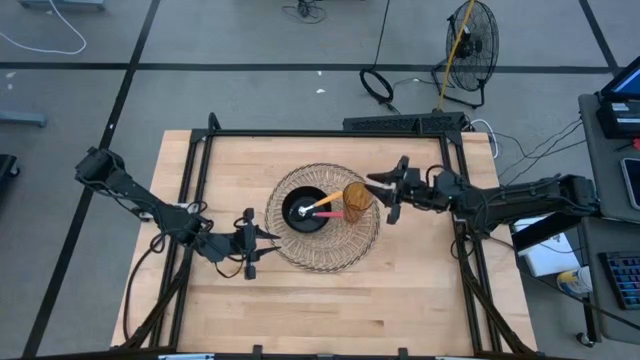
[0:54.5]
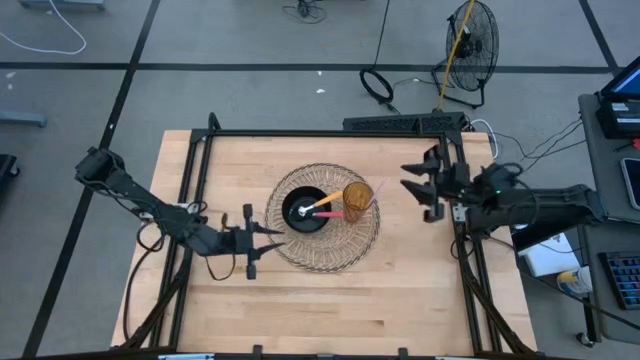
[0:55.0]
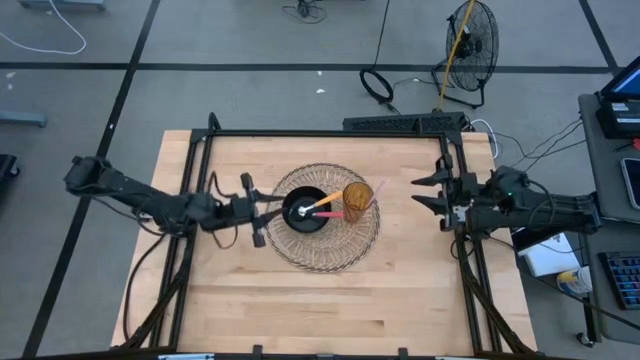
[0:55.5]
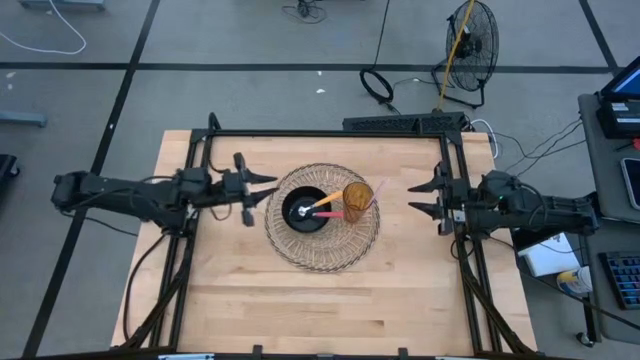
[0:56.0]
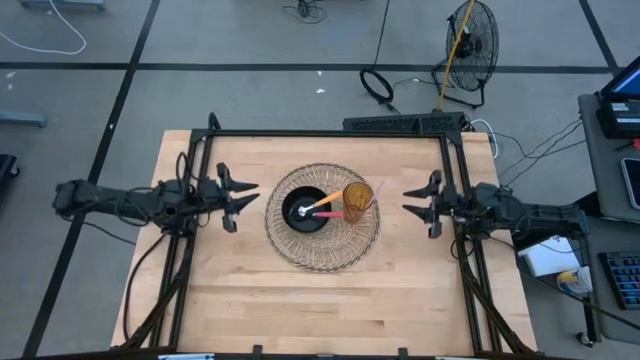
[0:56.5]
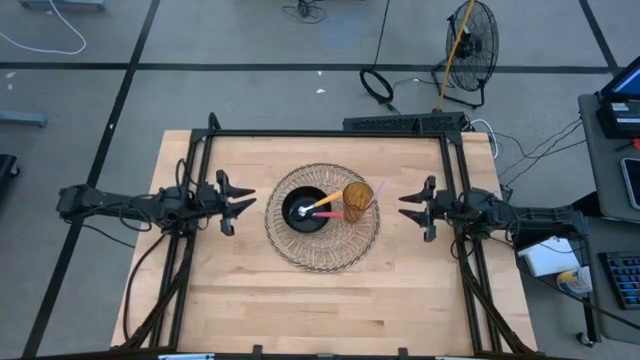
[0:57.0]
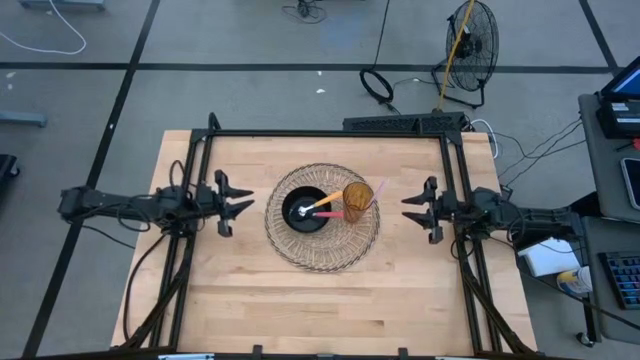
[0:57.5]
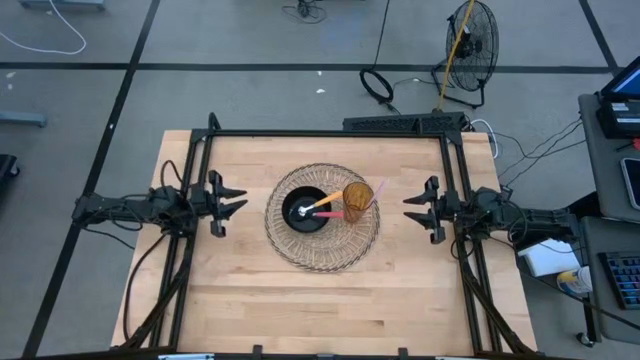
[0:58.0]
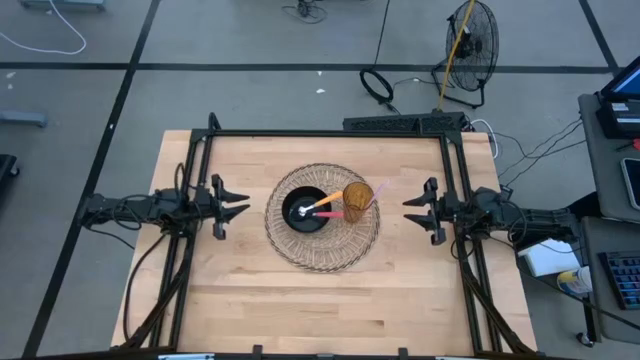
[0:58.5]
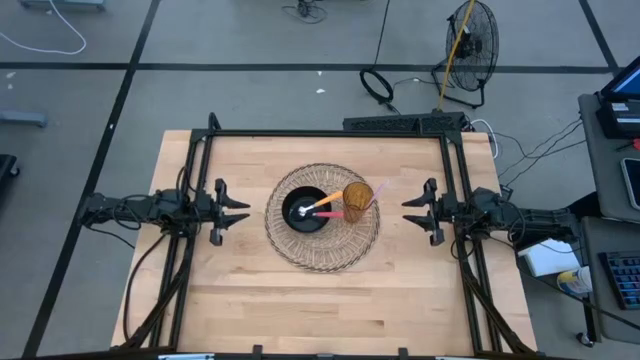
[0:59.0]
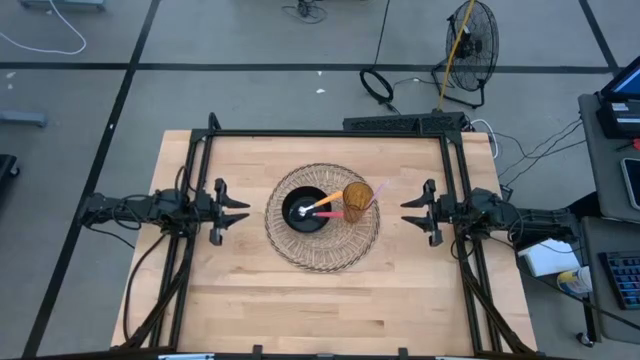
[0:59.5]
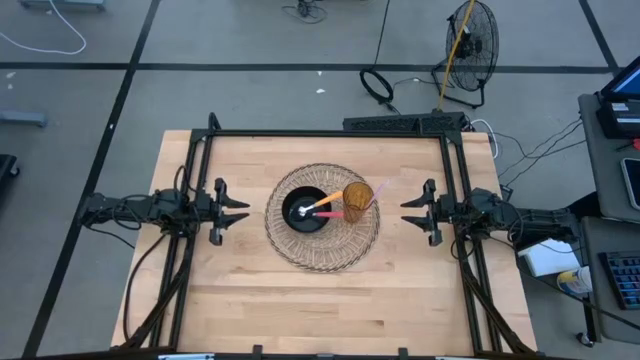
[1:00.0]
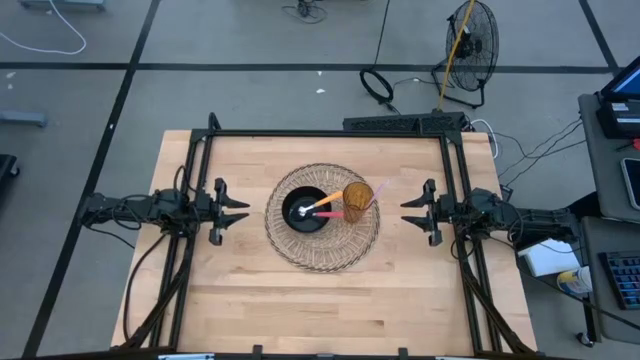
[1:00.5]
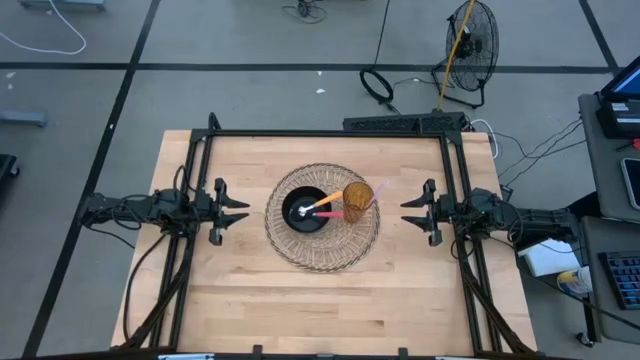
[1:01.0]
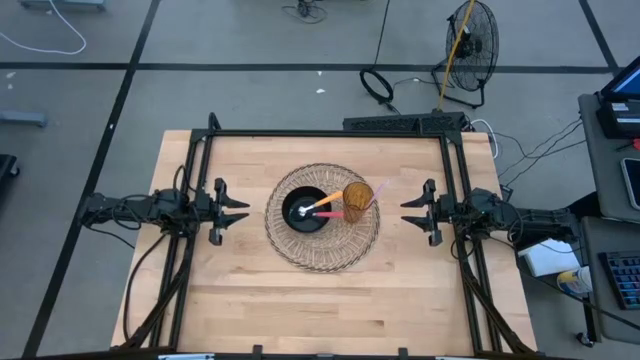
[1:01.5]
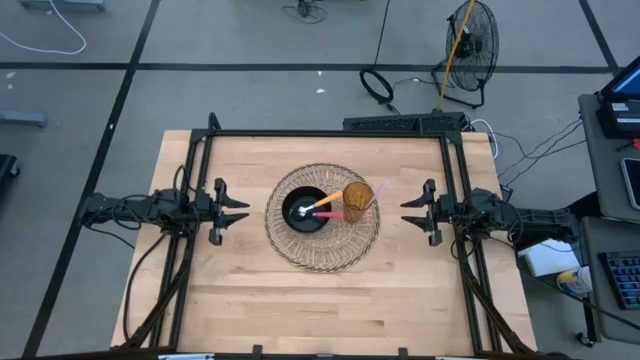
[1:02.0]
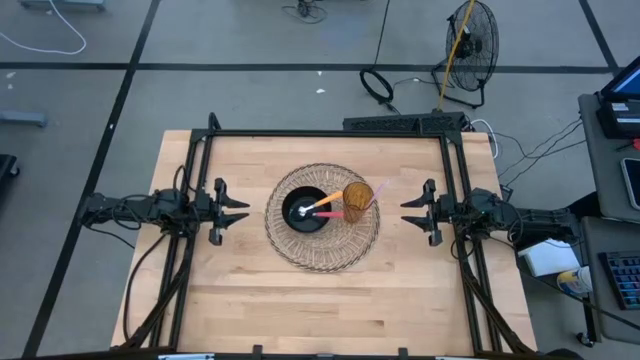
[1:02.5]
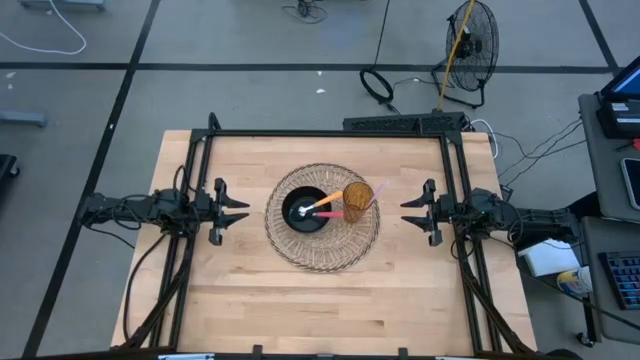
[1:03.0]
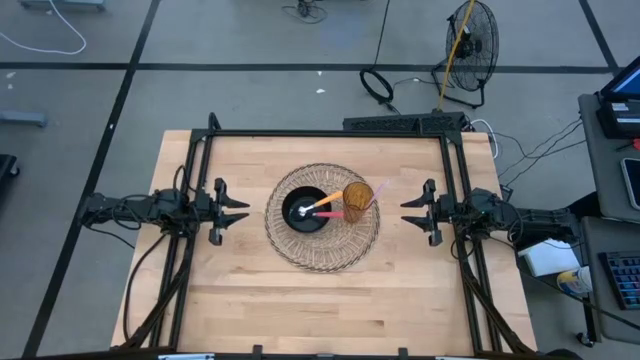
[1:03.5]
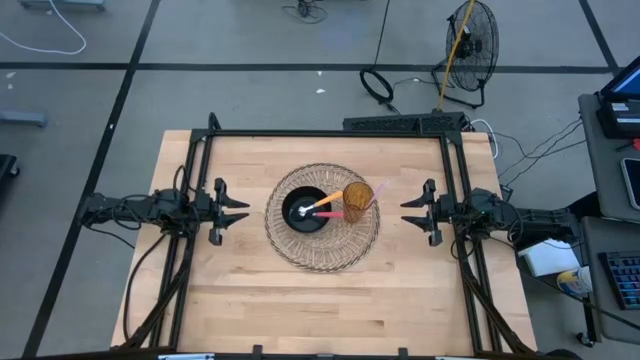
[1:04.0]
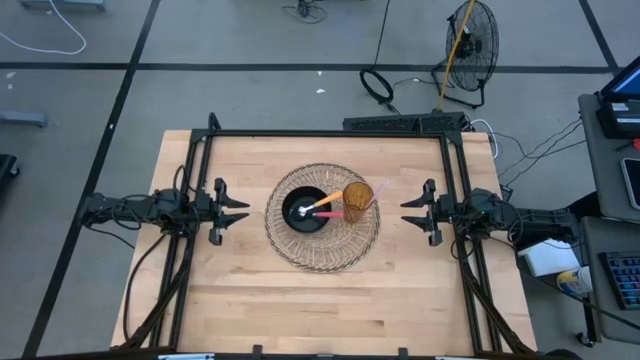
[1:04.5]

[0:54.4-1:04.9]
Task: Pick & Place Utensil
Return to Home Position

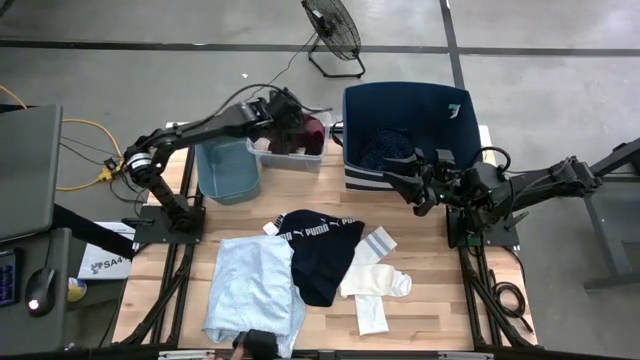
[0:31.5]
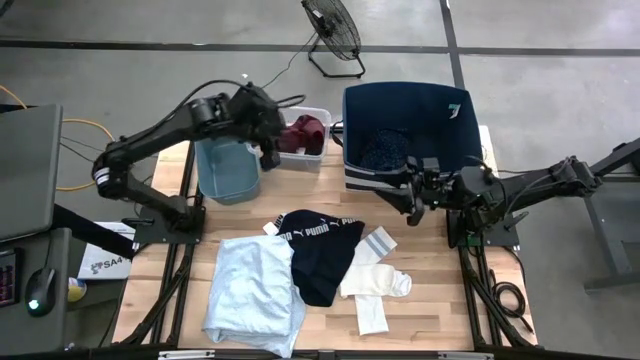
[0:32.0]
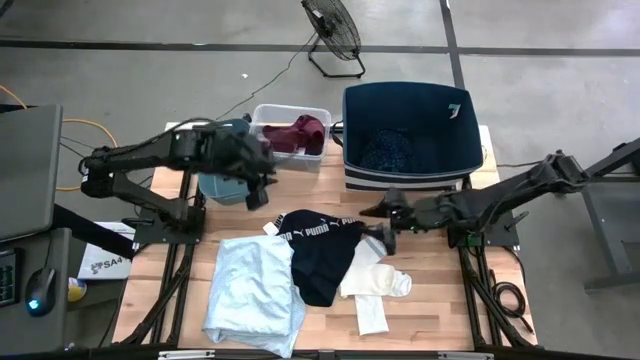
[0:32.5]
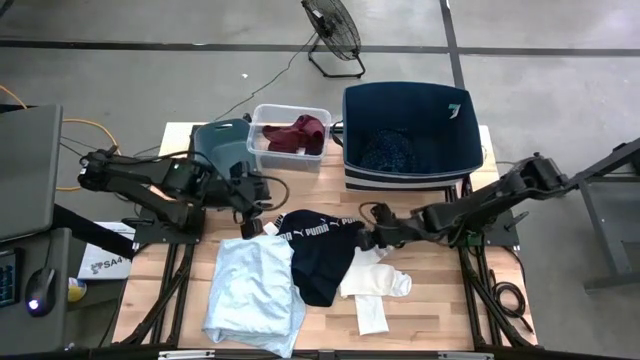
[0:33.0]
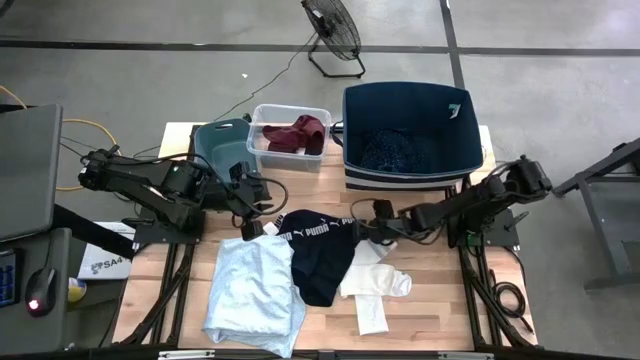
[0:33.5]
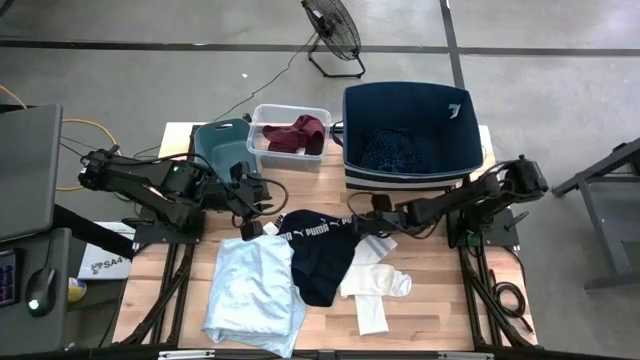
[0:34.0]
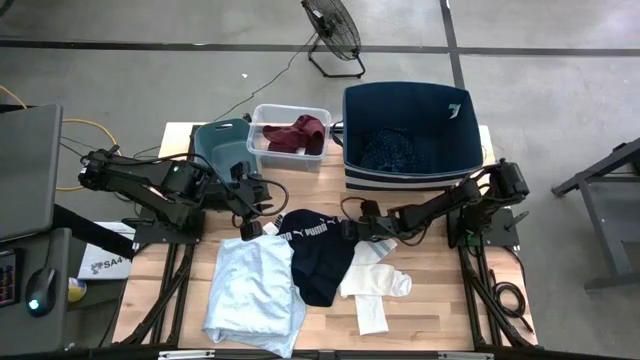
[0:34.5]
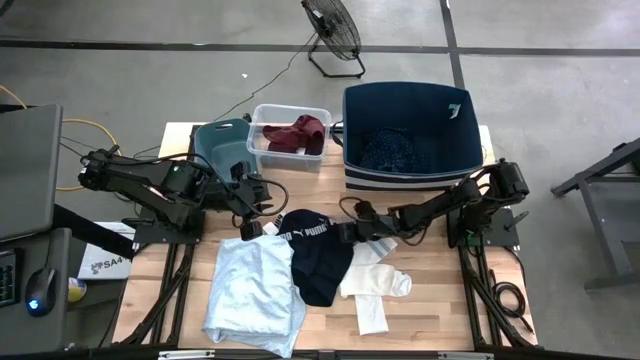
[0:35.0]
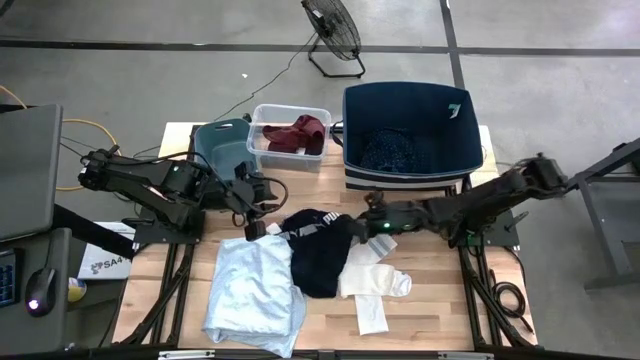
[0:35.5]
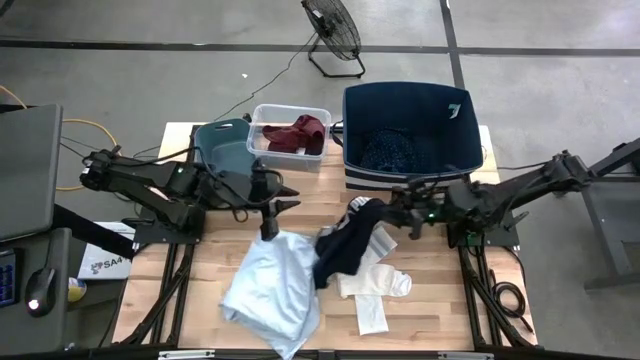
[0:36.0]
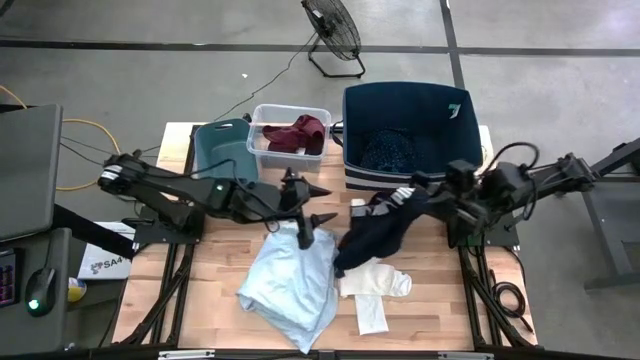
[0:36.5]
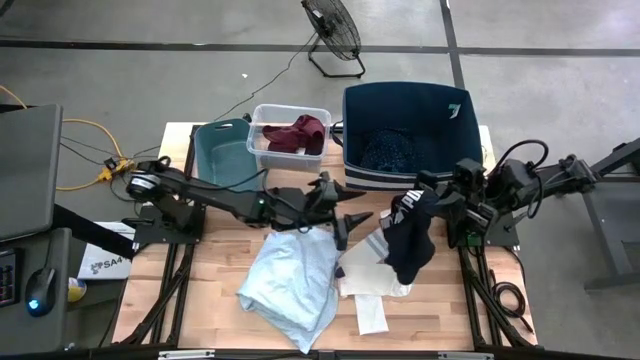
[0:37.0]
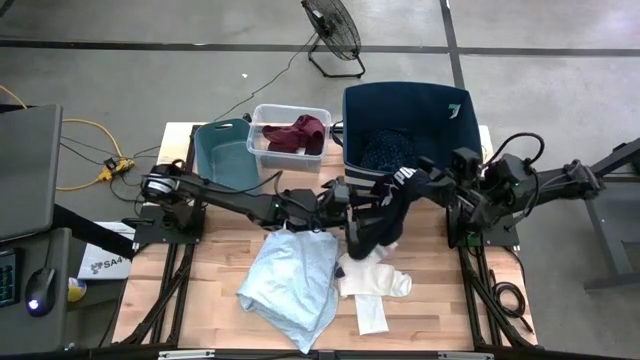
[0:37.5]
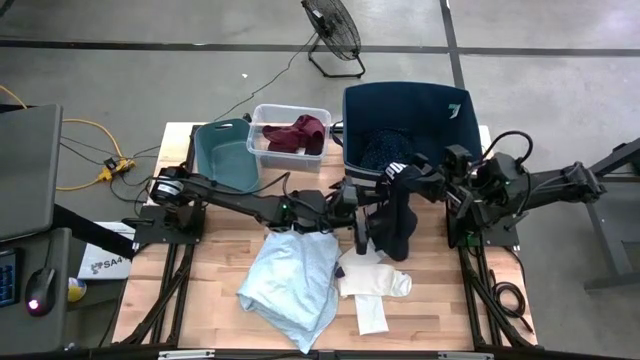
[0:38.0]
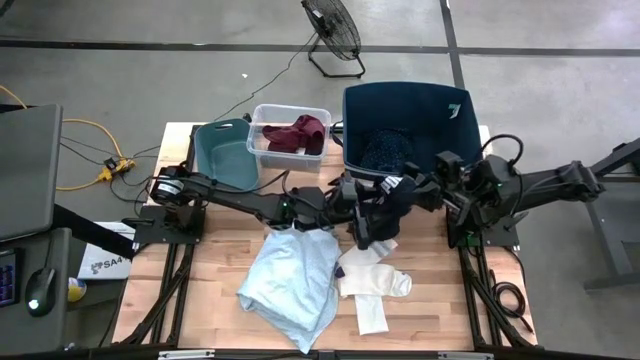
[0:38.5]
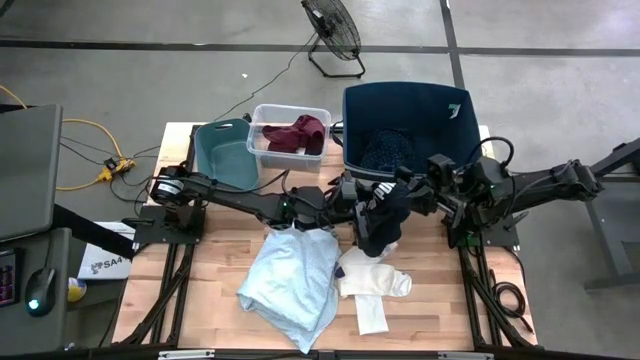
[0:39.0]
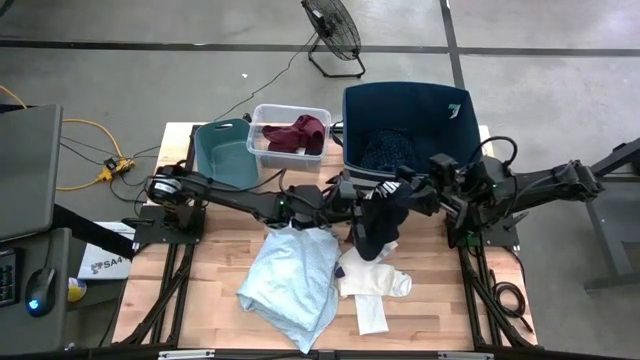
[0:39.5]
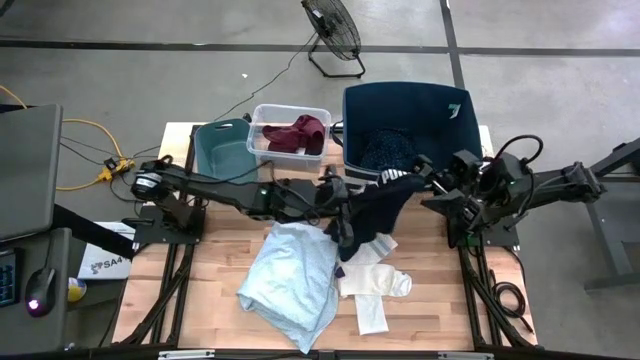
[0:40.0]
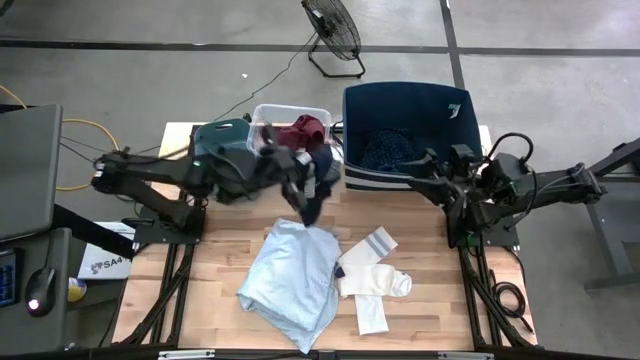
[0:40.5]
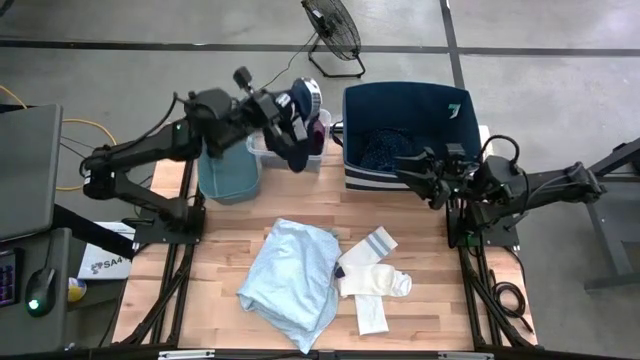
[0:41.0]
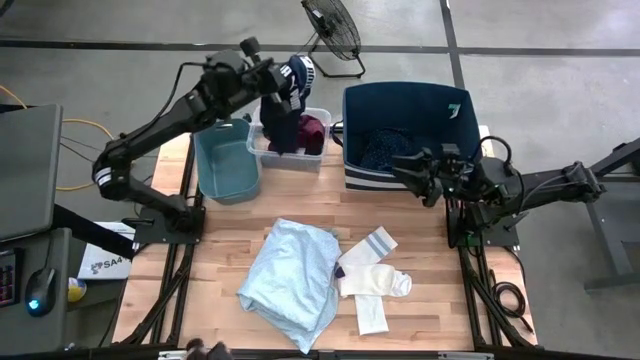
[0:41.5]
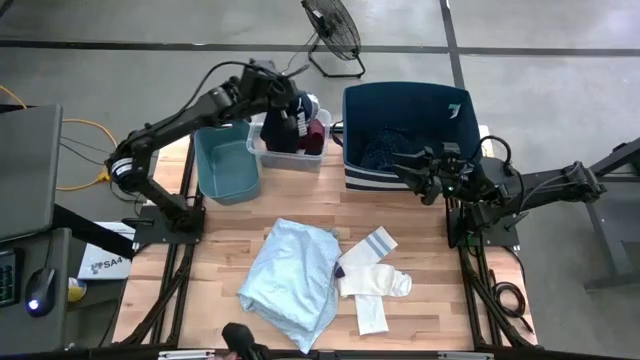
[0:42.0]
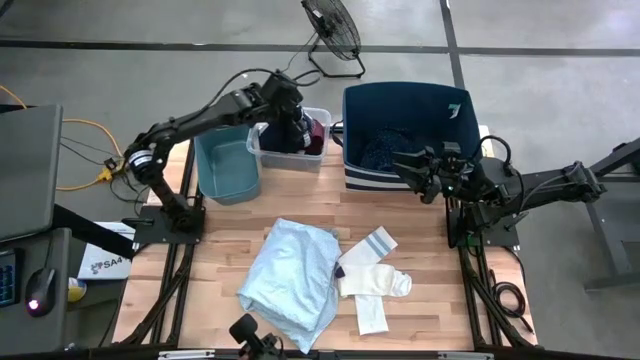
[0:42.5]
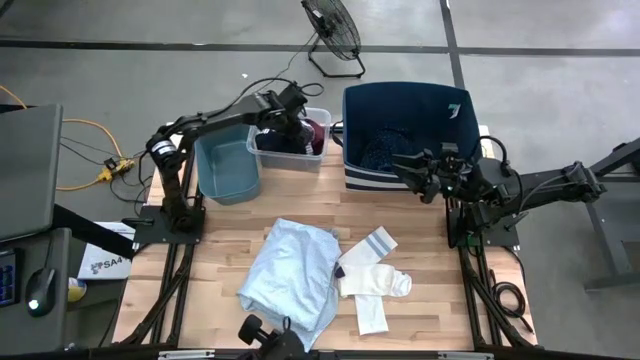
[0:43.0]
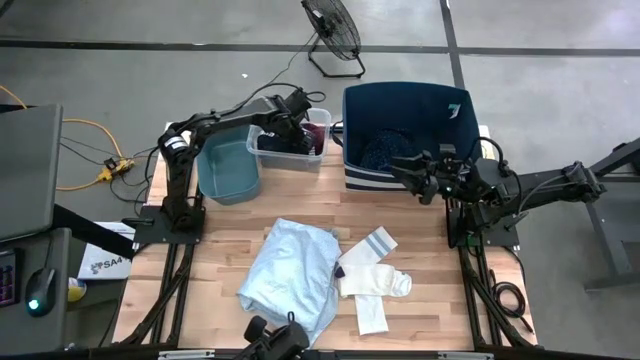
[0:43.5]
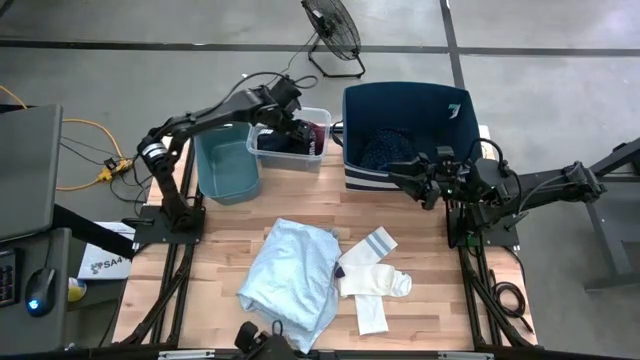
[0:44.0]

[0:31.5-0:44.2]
Task: Pick & Place Cloths
Put the blue boxer shorts into the transparent bin
